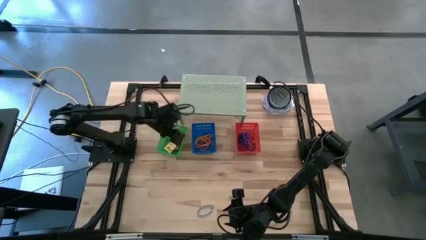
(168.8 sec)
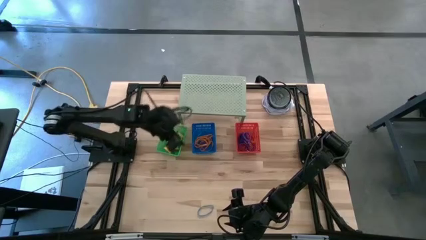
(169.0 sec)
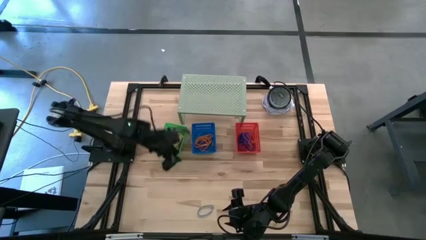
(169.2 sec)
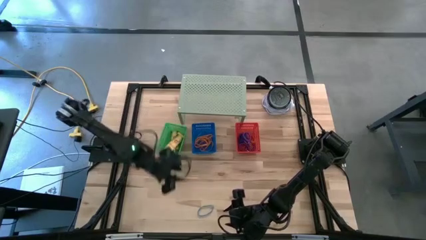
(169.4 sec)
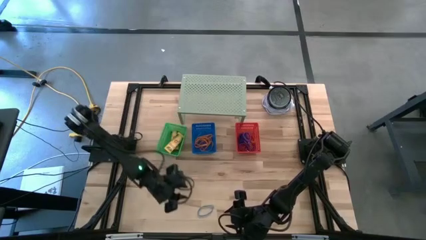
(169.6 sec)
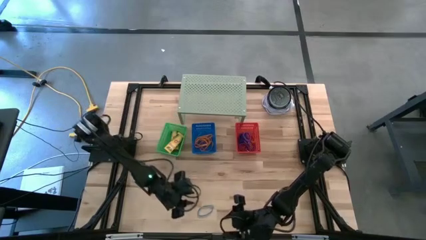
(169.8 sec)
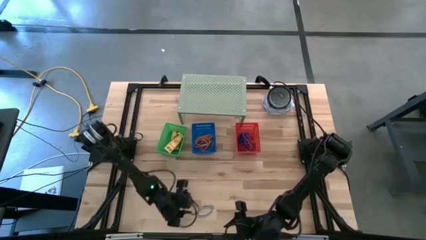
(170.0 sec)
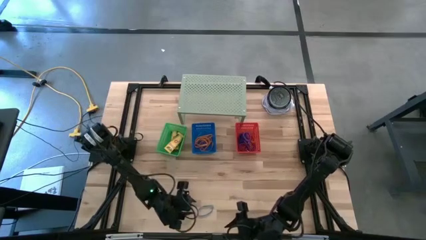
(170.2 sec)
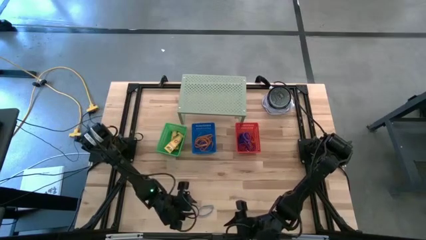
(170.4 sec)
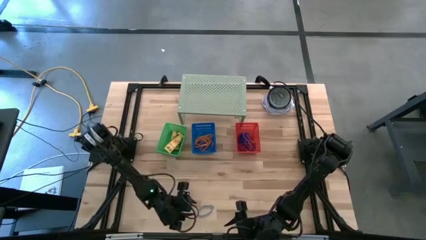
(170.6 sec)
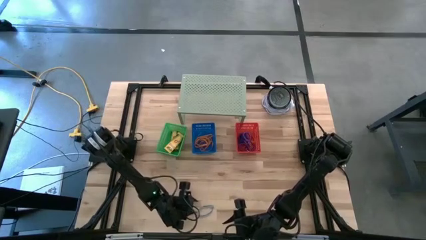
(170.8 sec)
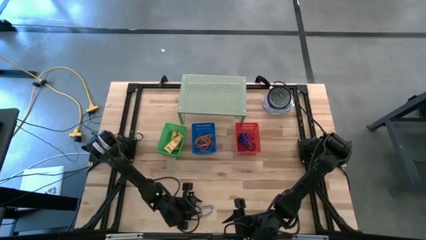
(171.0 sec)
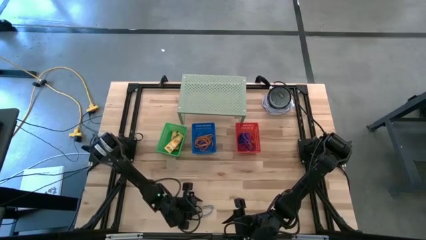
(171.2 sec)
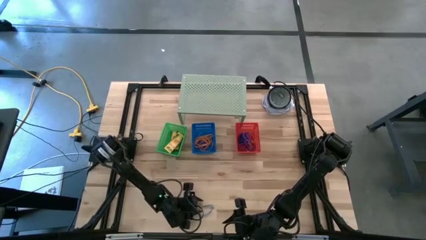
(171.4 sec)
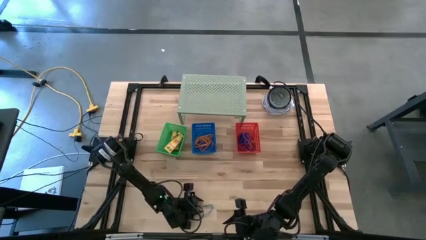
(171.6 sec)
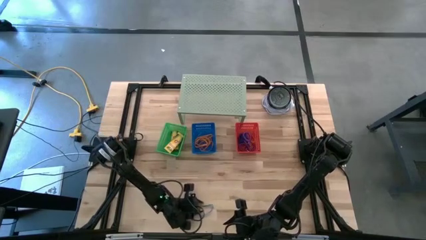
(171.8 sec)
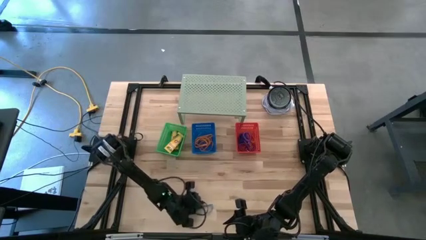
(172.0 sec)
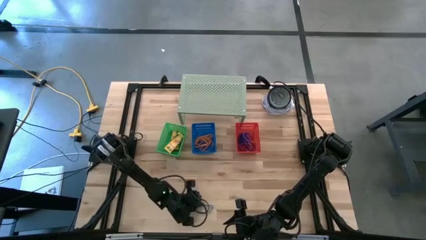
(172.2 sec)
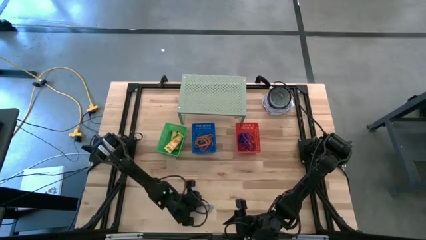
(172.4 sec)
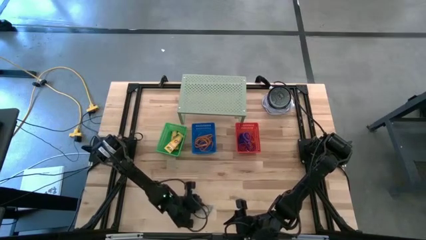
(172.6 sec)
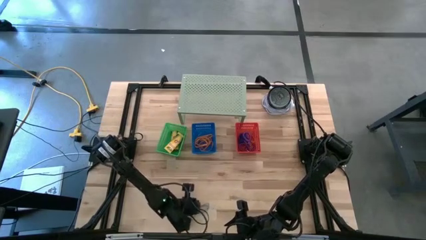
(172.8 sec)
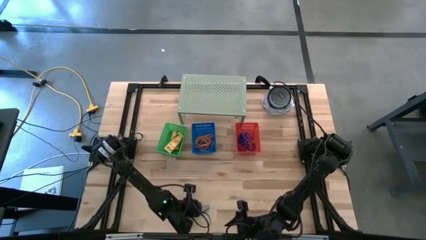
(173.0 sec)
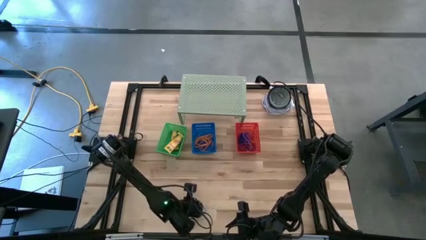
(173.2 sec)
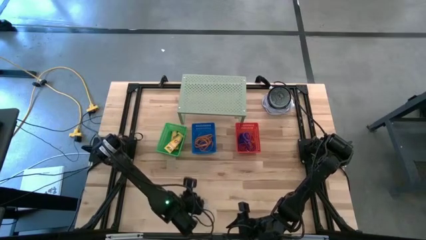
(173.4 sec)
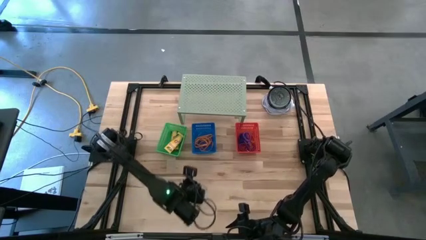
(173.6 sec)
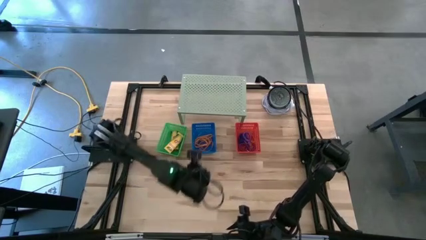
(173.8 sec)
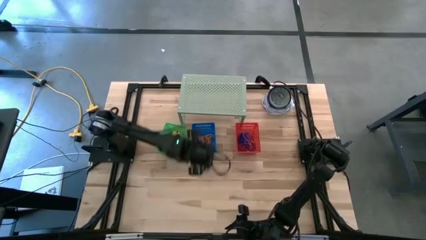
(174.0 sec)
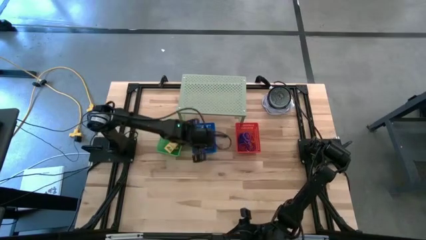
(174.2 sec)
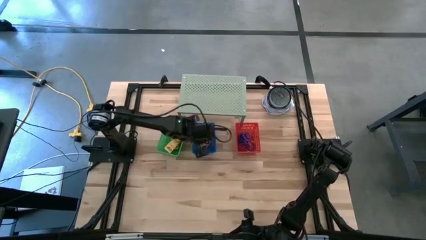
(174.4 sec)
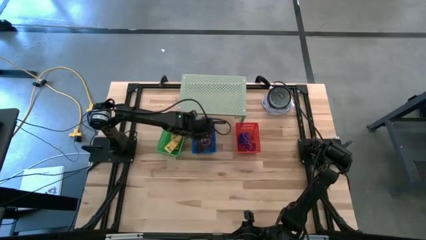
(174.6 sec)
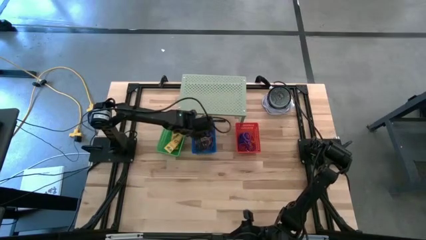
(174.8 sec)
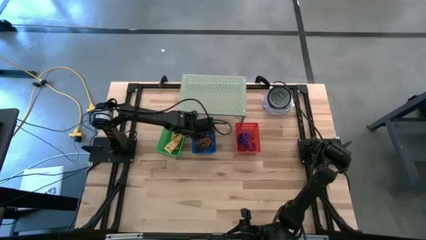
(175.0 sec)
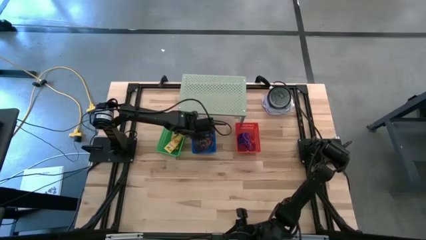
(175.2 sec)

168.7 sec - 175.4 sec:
Task: Pick & Place Office Desk Supplies
Put the blue rubber band into the blue bin

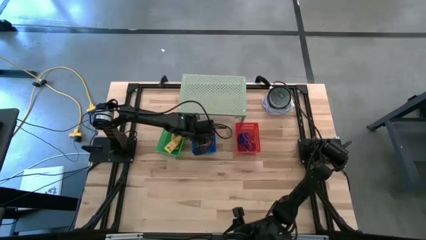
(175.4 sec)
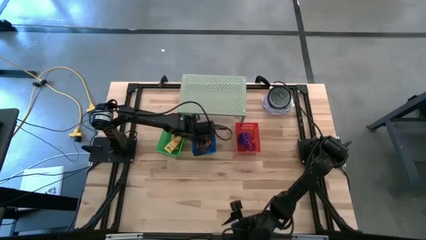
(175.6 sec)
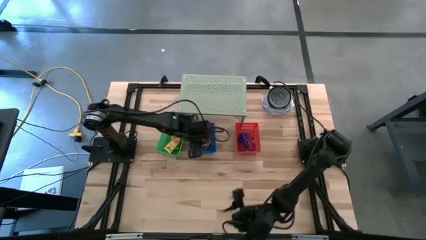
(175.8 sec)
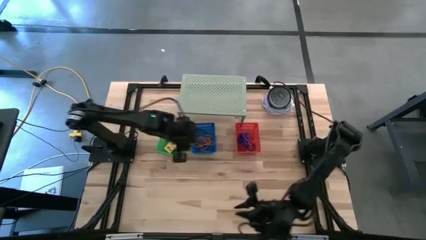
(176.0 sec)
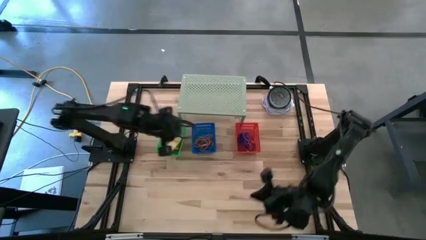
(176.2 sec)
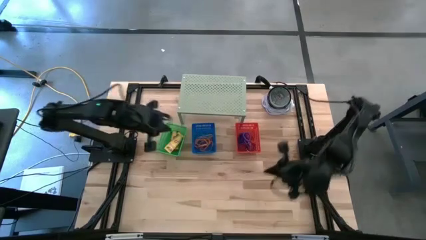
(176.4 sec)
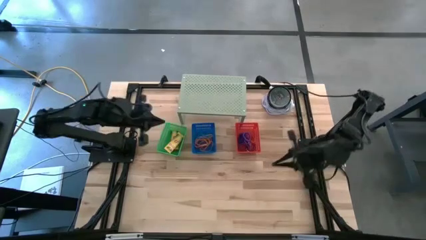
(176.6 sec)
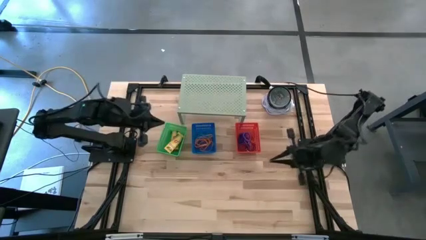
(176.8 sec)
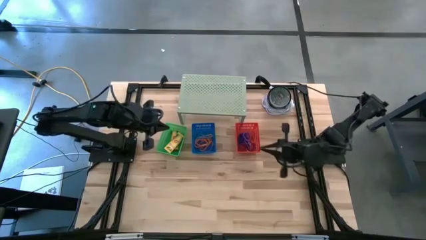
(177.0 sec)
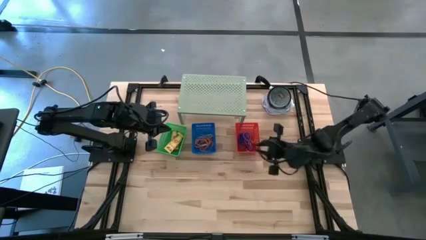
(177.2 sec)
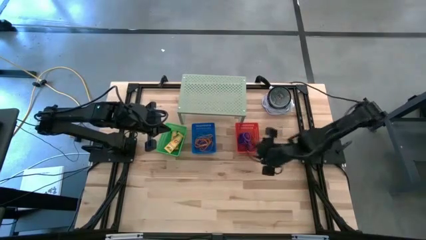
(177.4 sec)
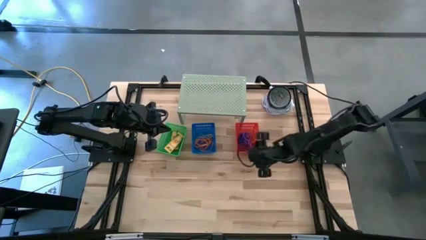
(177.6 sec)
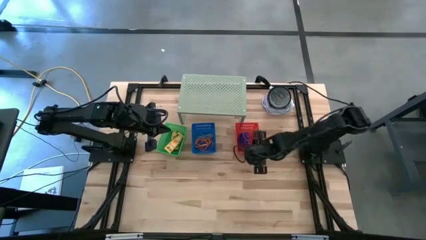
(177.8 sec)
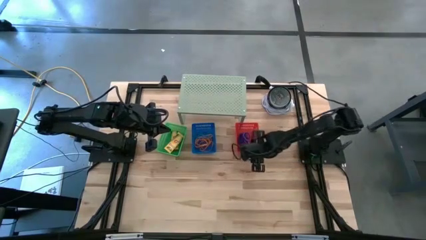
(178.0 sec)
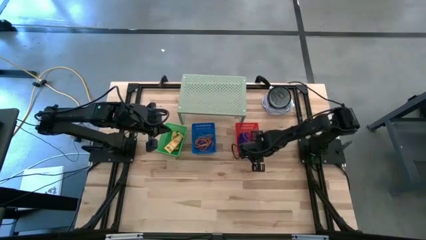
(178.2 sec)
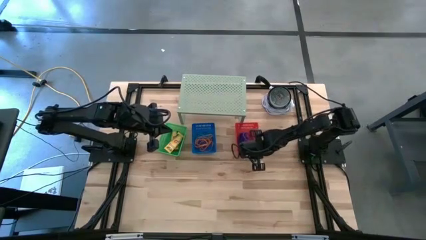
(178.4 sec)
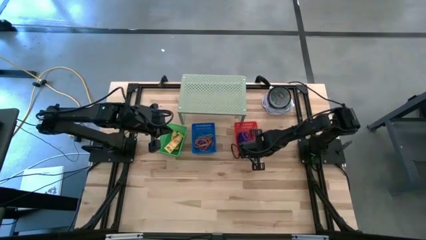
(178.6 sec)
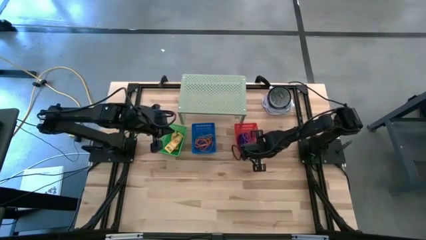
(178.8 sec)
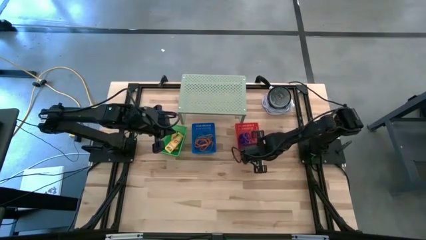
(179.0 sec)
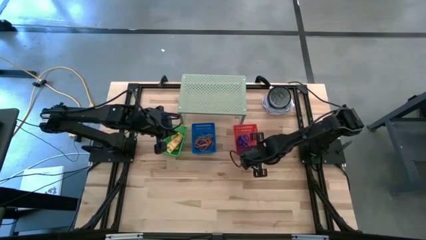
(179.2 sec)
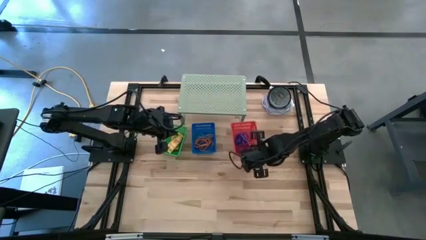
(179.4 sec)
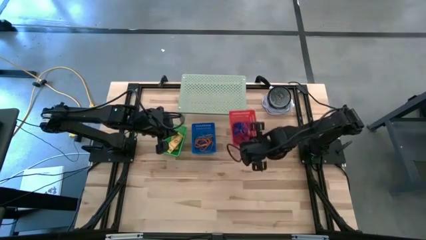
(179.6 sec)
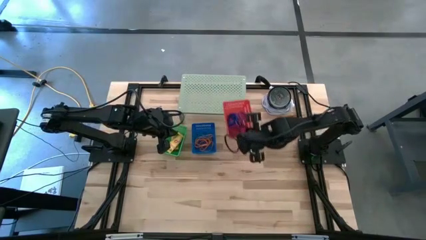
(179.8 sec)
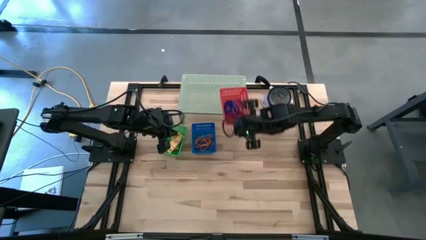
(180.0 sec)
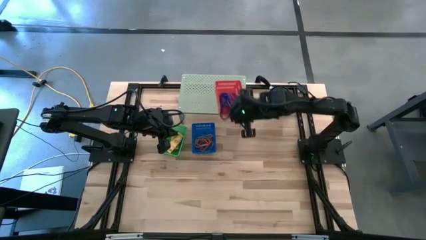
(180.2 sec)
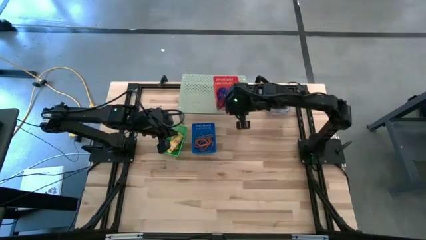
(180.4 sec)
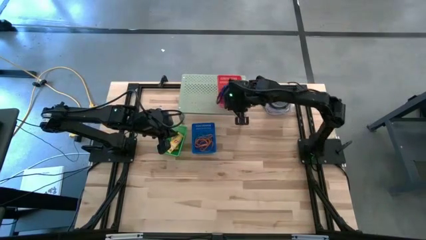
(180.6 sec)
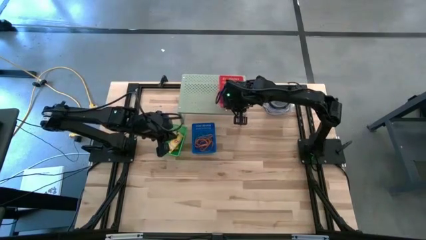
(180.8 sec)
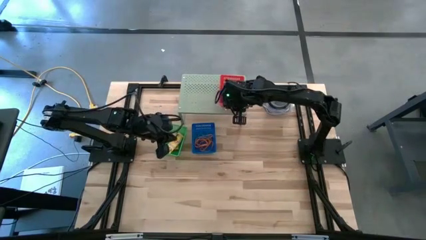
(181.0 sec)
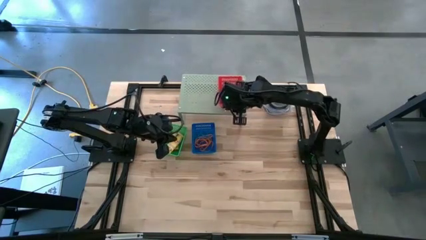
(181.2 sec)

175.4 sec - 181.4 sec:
Put the red bin on the shelf

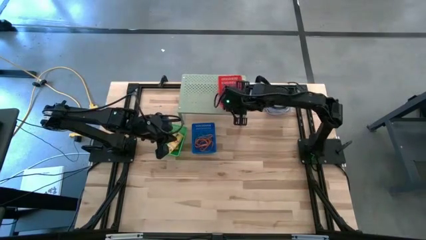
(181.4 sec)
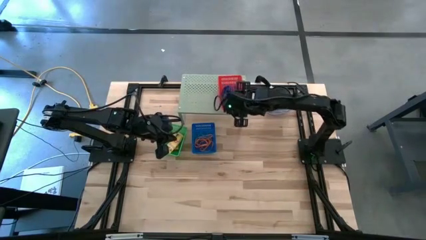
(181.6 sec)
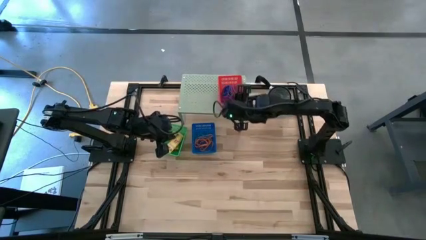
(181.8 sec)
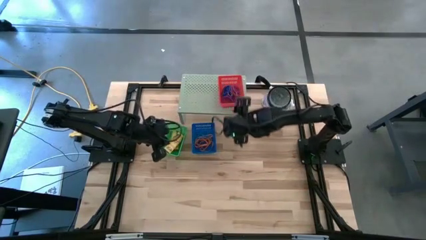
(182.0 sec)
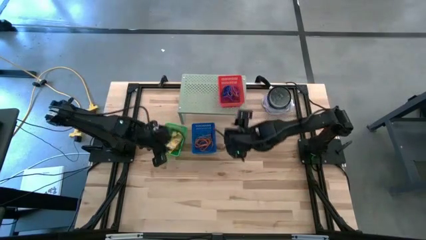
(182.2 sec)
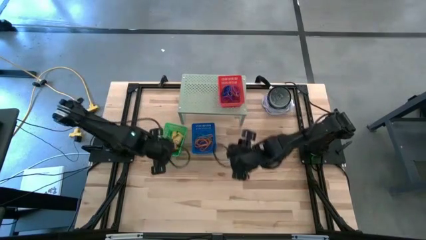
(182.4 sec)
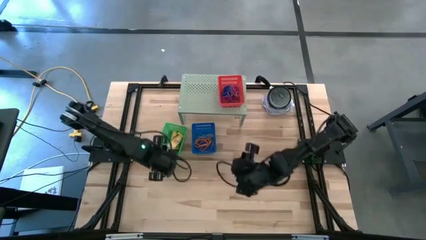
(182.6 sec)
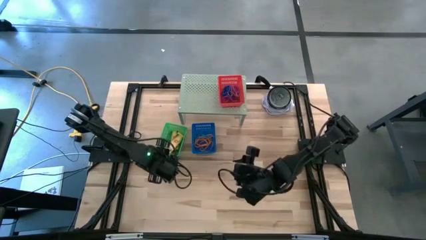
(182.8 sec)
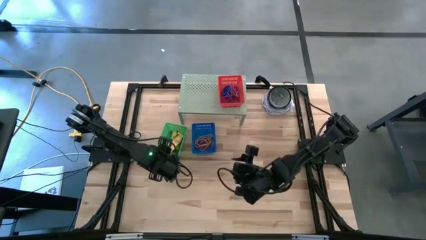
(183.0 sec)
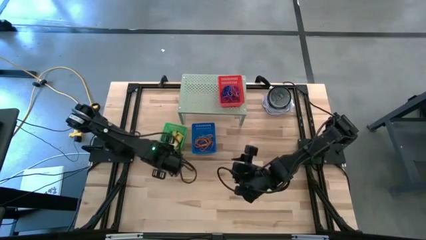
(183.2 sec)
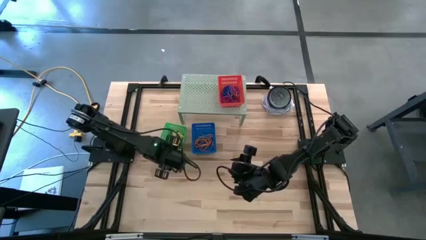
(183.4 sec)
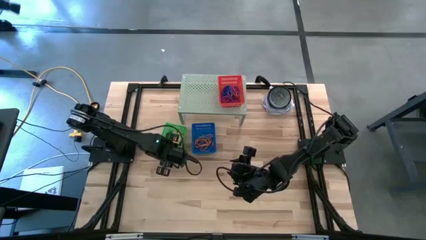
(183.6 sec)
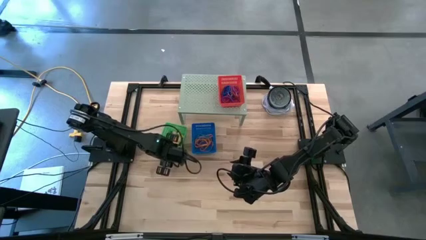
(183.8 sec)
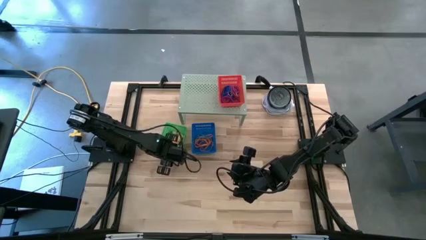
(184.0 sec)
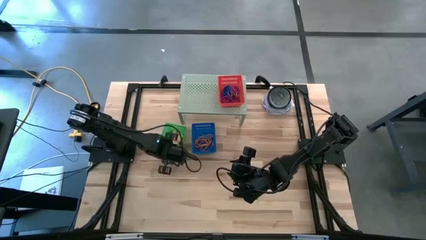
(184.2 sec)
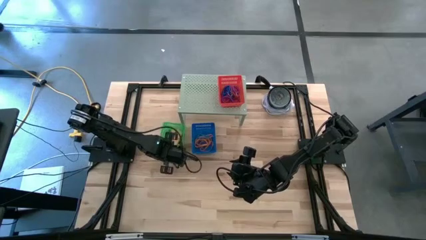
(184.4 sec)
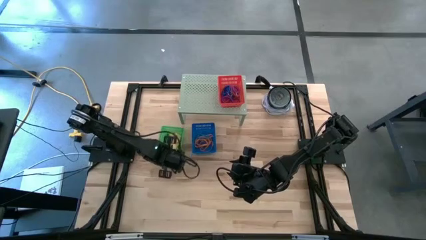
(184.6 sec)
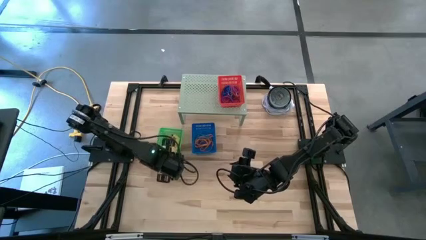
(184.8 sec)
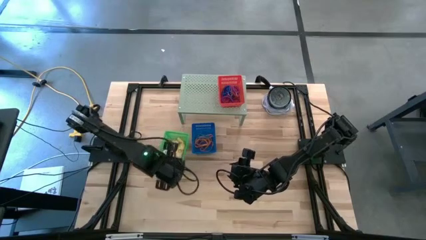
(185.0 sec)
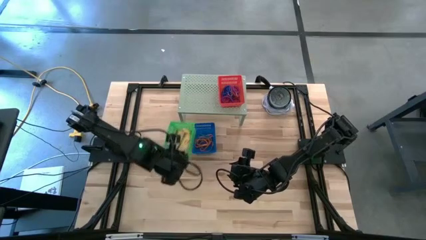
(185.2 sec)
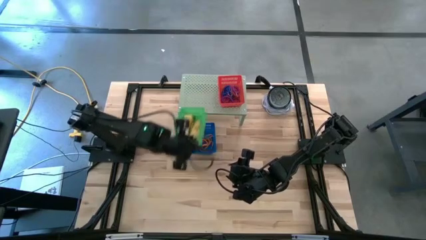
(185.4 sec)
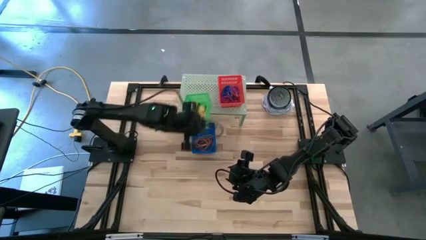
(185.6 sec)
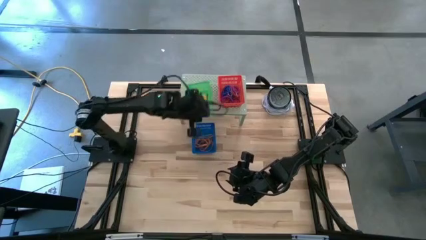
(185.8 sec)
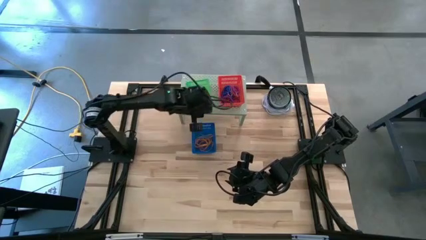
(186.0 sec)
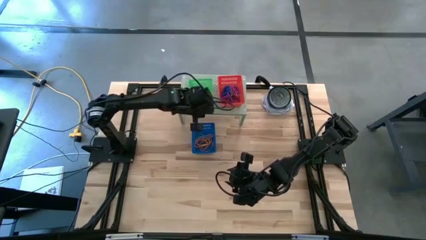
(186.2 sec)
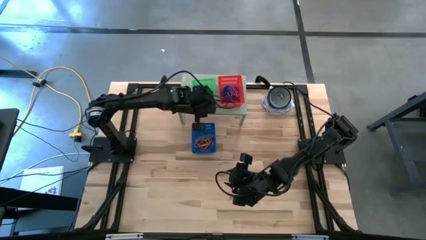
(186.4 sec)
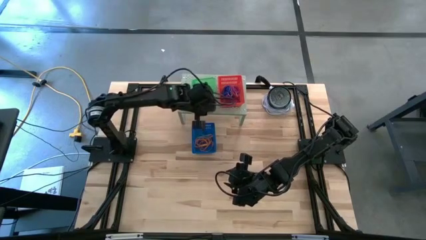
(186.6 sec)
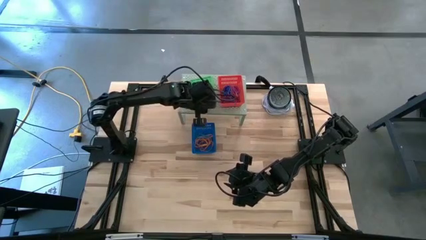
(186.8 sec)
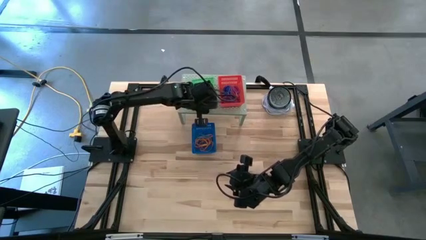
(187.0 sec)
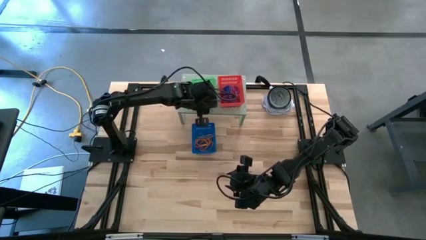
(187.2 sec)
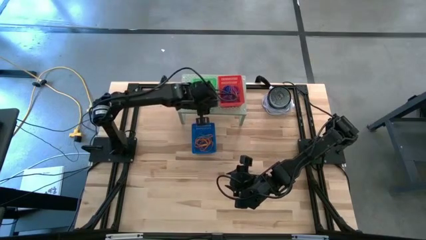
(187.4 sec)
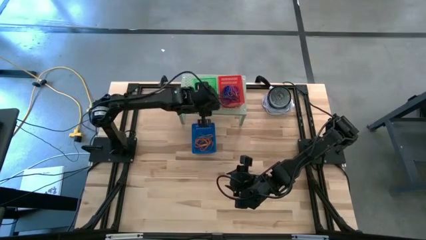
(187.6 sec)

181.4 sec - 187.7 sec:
Put the green bin on the shelf
